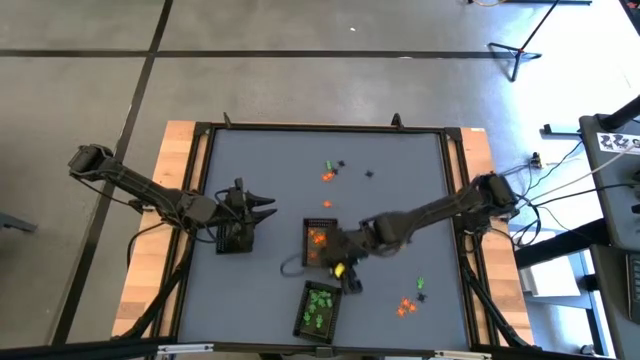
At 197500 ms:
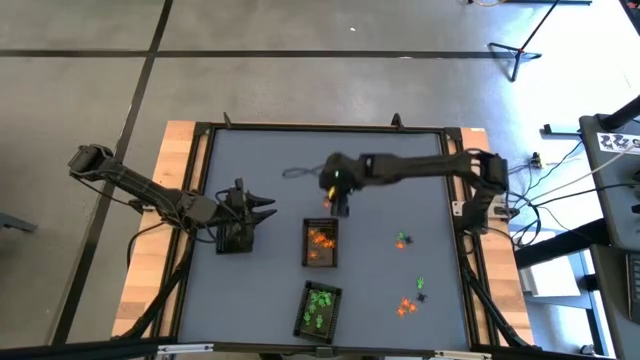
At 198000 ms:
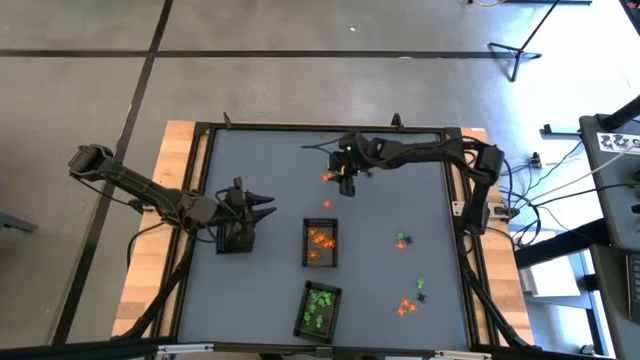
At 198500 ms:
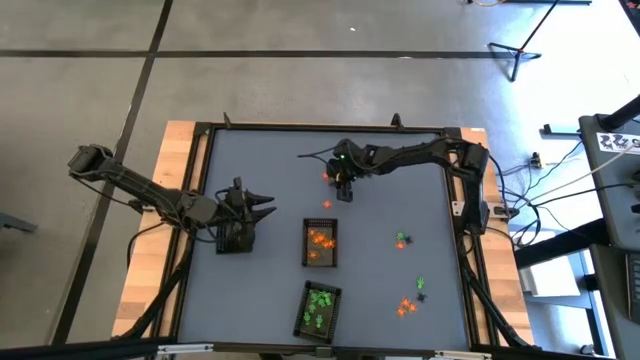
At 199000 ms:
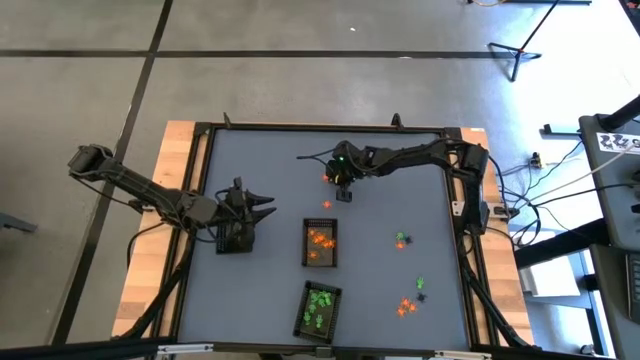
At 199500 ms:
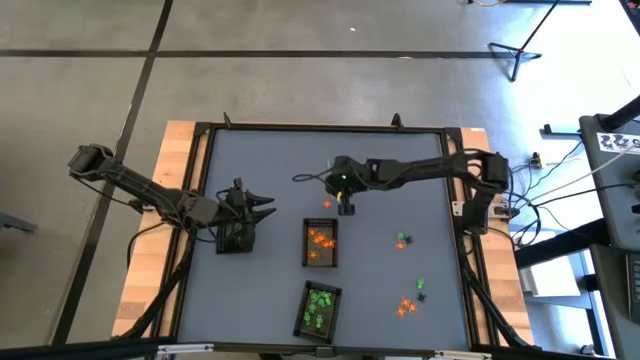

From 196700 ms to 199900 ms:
Task: Sort Halloween decoration
Put the orange spider toy into the top right black basket

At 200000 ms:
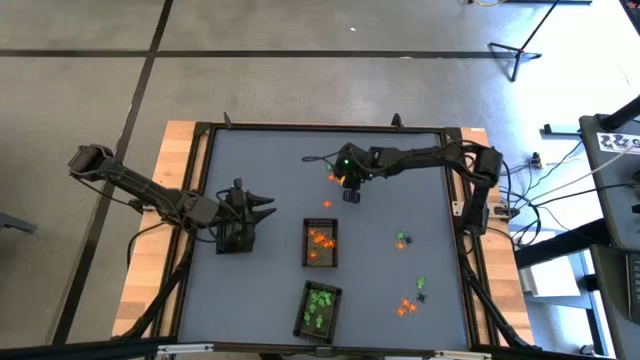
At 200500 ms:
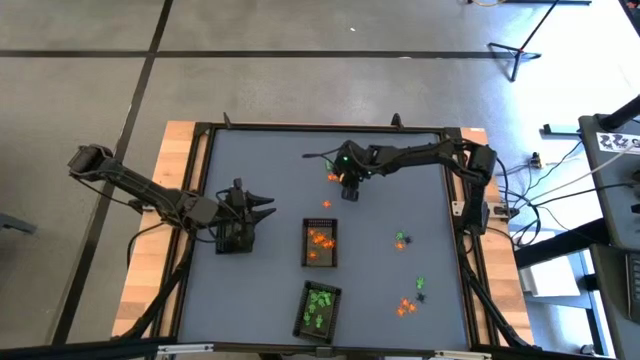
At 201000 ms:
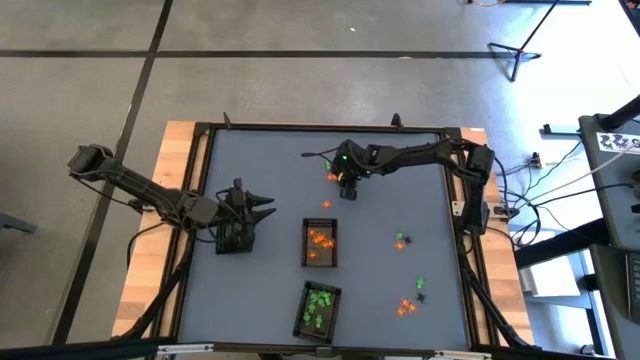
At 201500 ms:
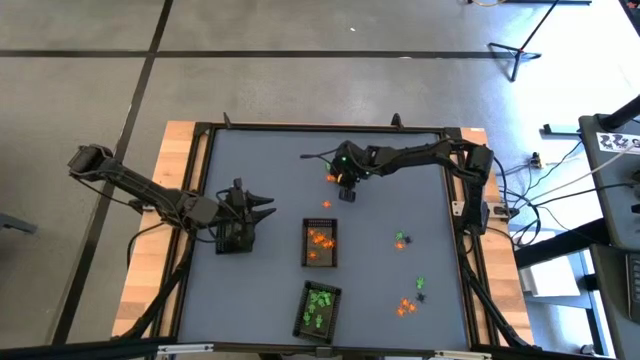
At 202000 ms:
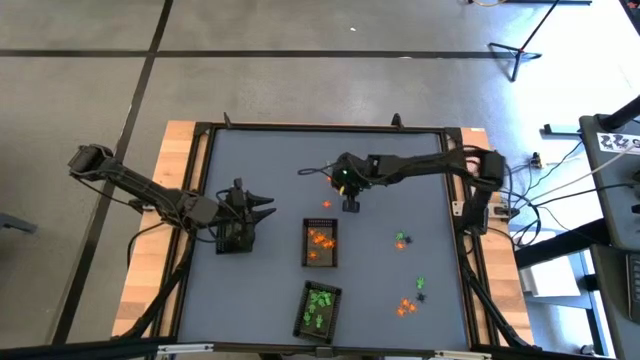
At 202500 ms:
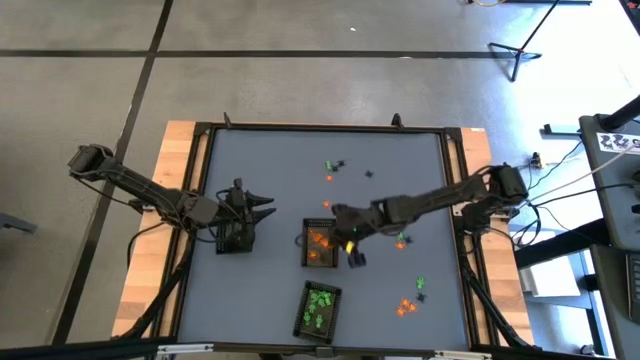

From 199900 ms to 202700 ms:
Put the orange spider toy into the top right black basket

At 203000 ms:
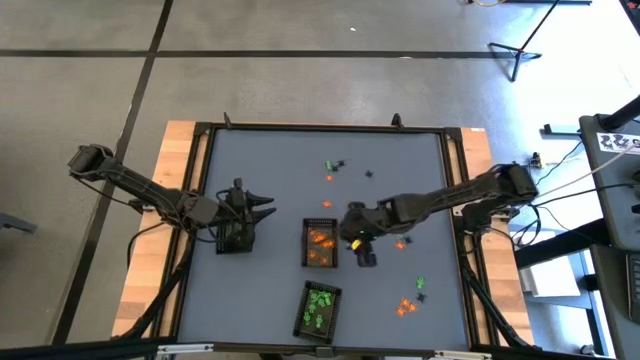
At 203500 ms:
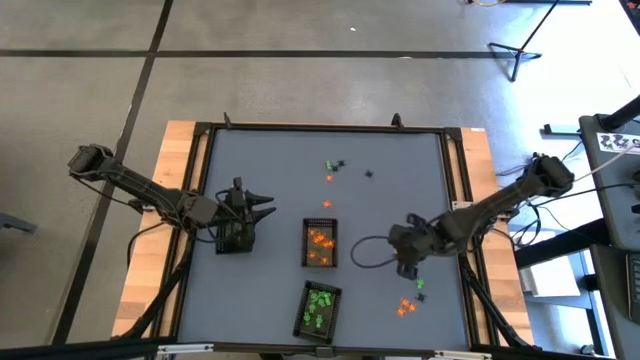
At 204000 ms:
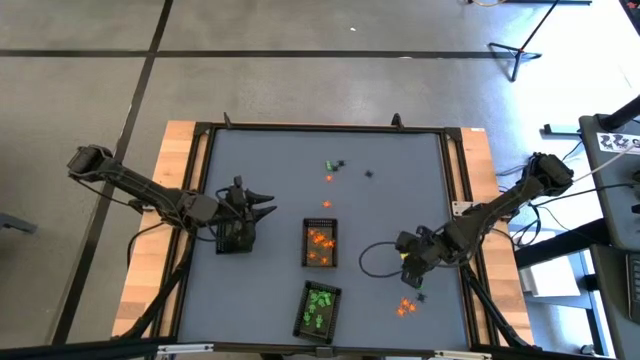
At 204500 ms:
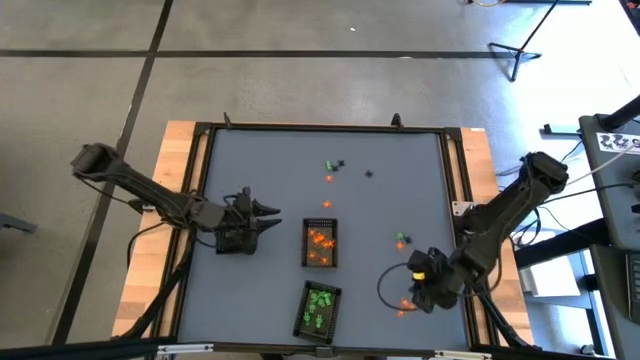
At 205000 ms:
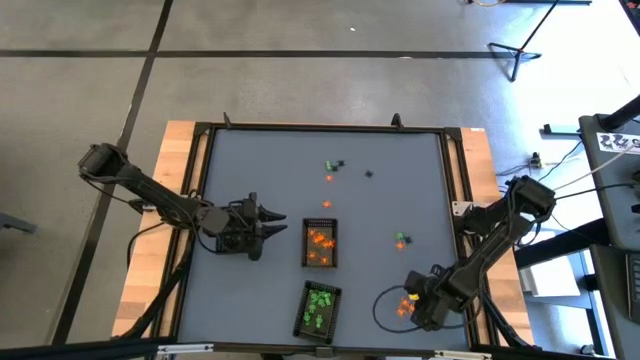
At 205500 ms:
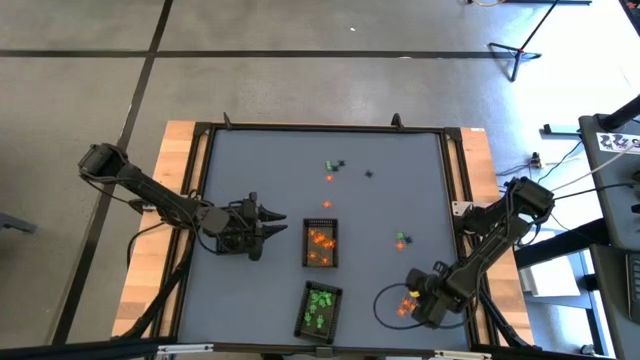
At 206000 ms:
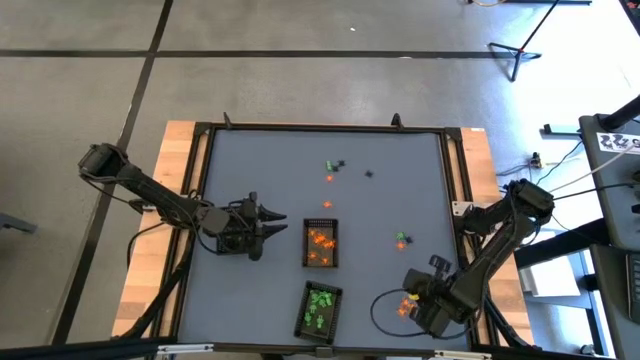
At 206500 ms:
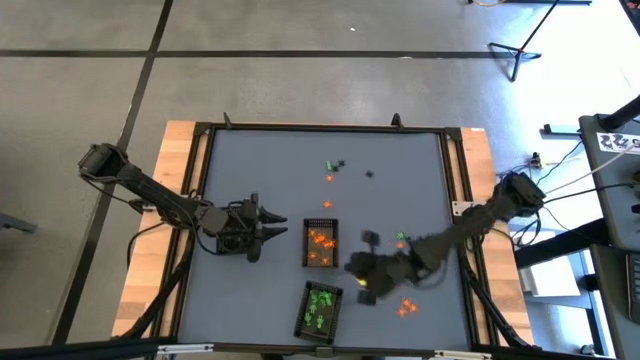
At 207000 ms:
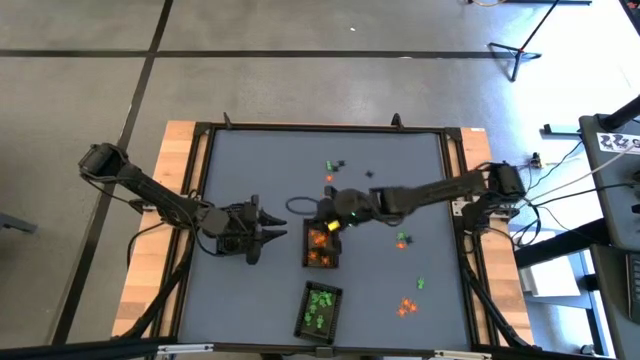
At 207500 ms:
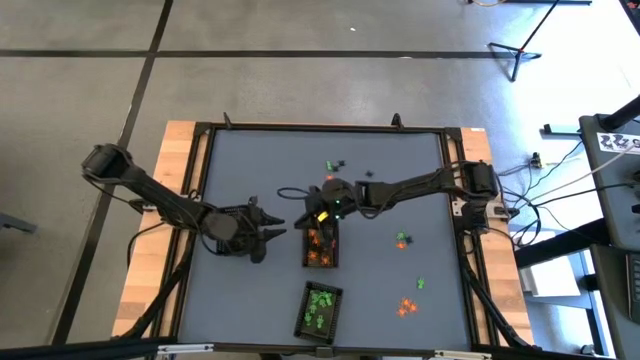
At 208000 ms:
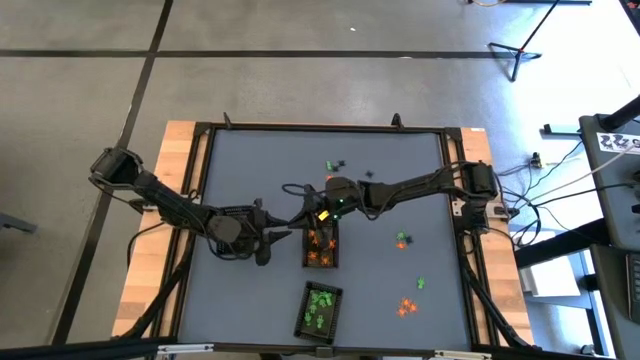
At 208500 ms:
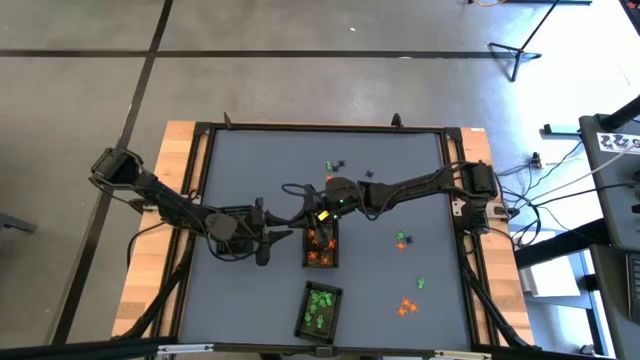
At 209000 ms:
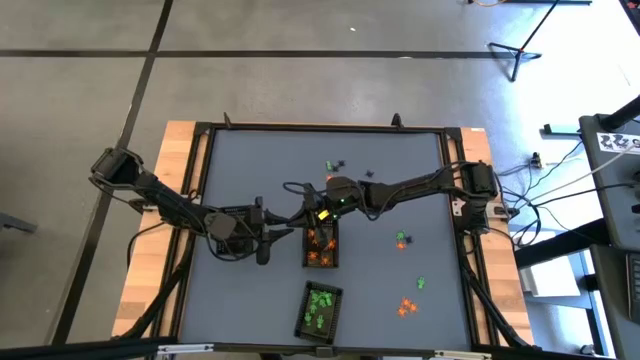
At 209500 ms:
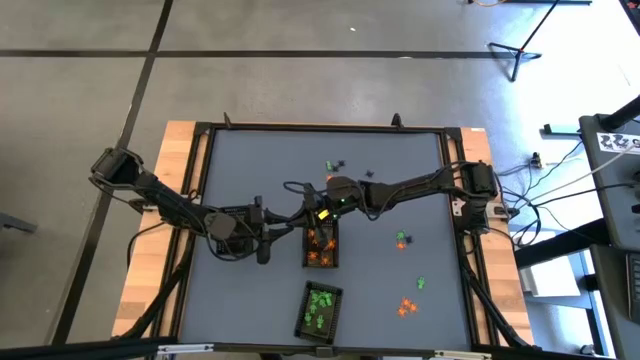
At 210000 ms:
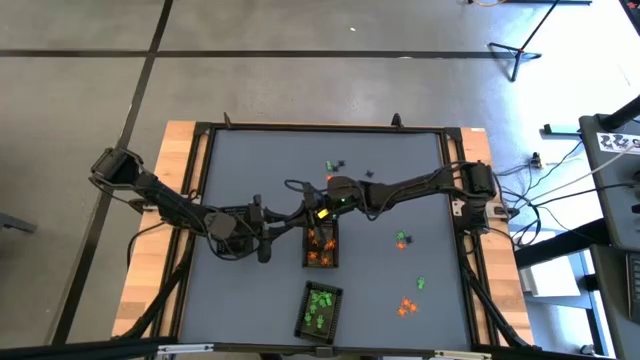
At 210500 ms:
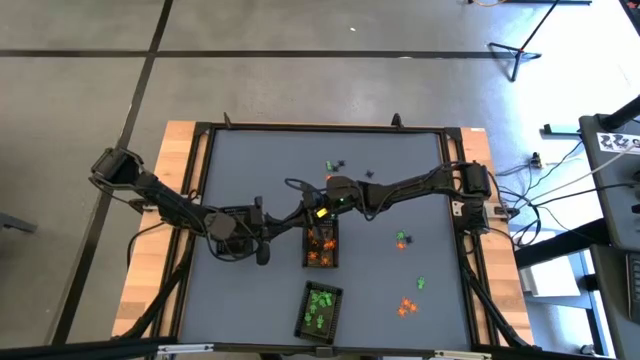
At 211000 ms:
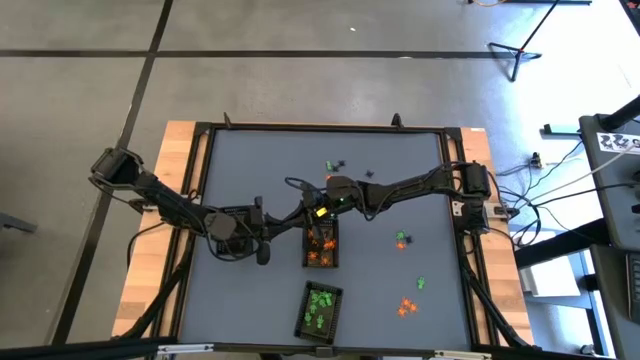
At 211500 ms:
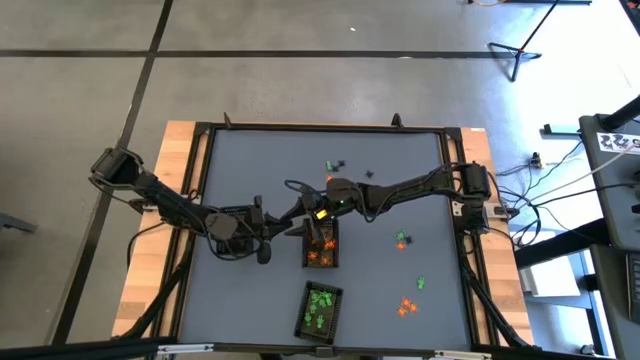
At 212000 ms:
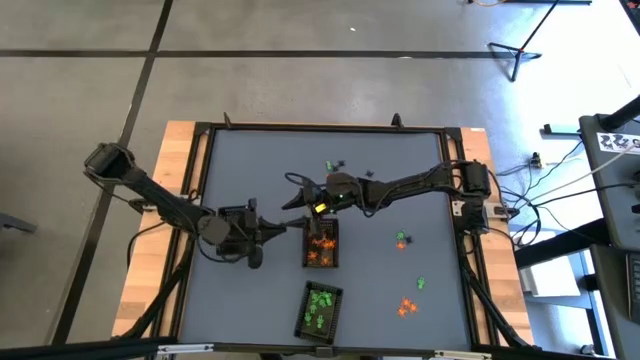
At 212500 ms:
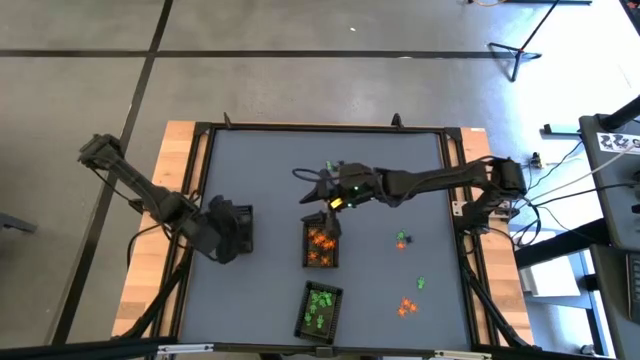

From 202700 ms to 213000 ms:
Put the black spider toy into the top left black basket

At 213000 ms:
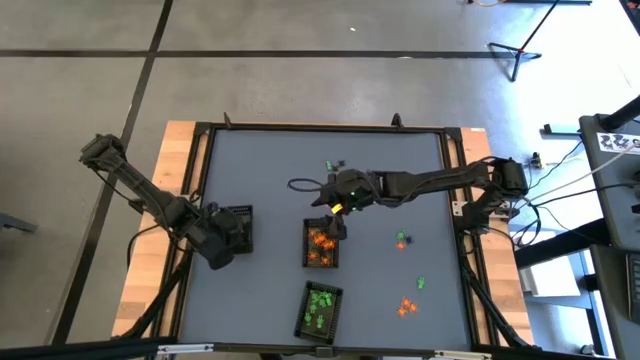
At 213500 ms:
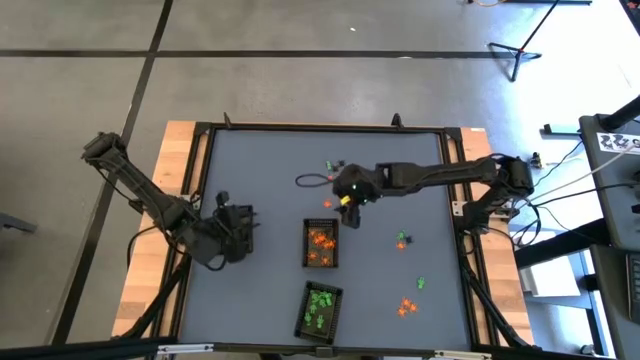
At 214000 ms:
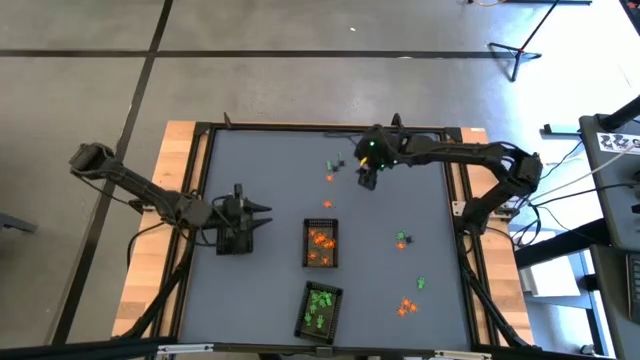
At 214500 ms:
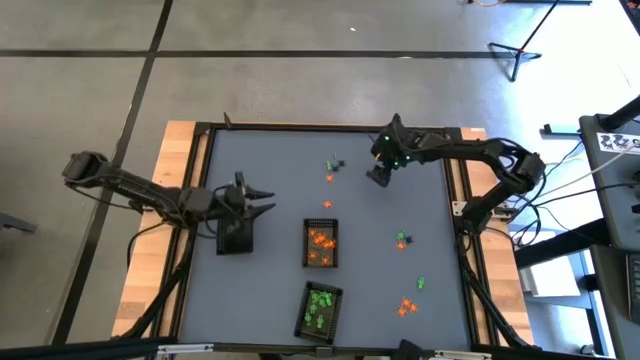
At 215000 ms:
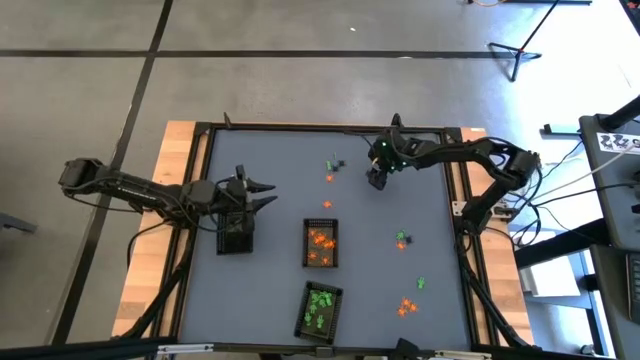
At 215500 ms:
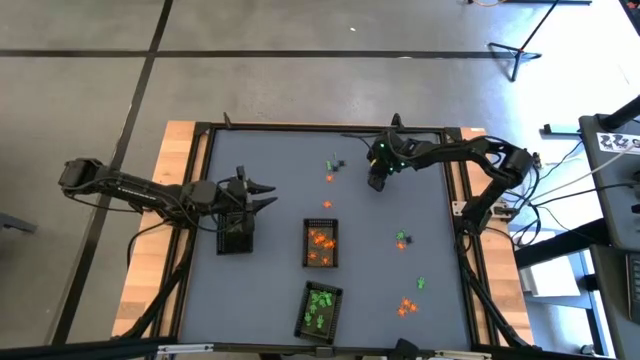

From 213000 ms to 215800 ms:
Put the black spider toy into the top left black basket
